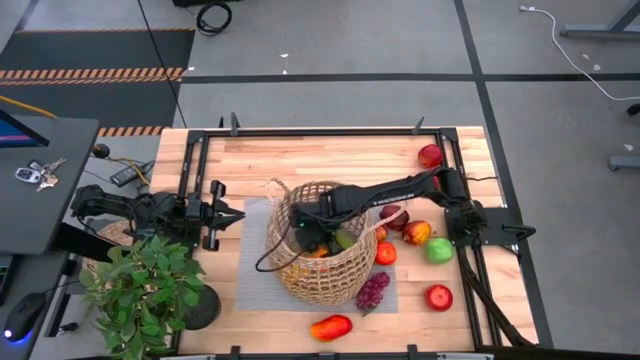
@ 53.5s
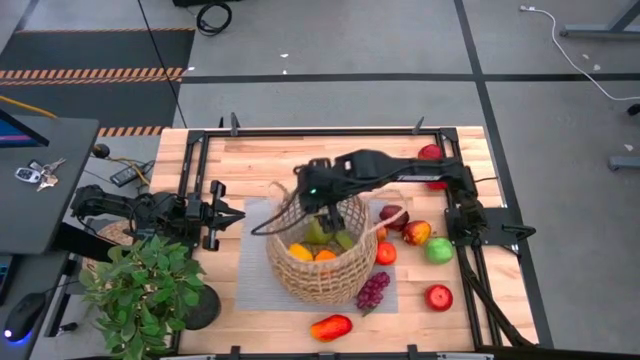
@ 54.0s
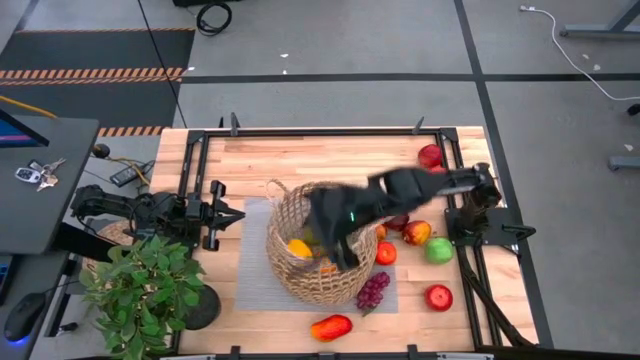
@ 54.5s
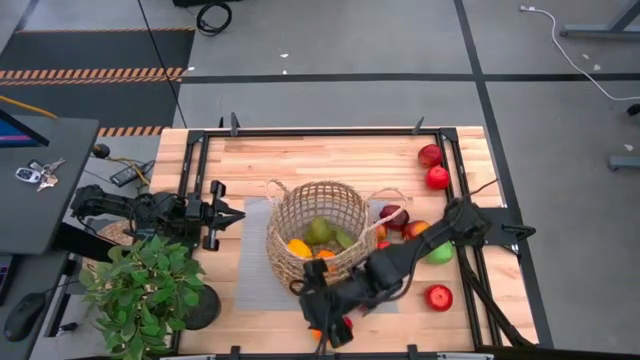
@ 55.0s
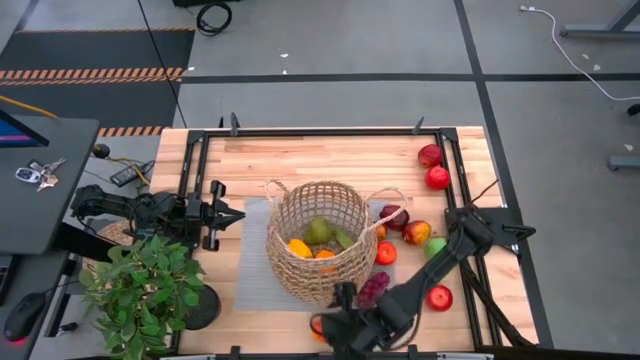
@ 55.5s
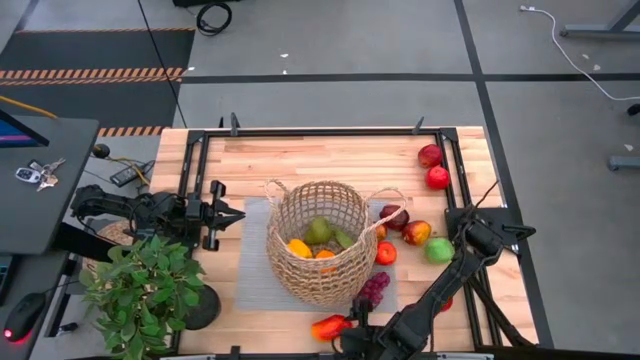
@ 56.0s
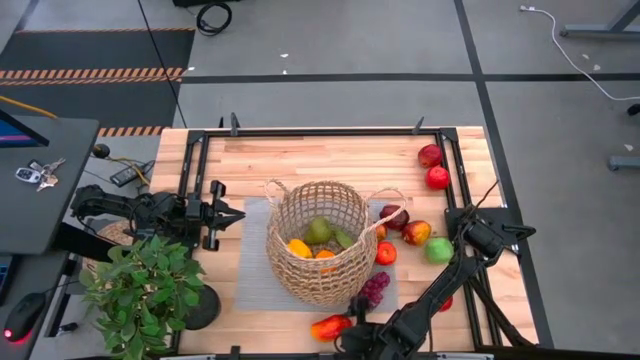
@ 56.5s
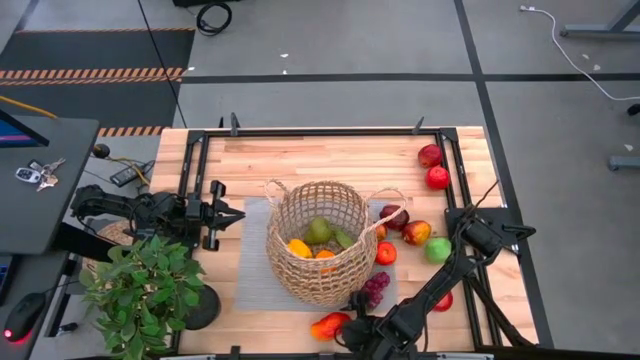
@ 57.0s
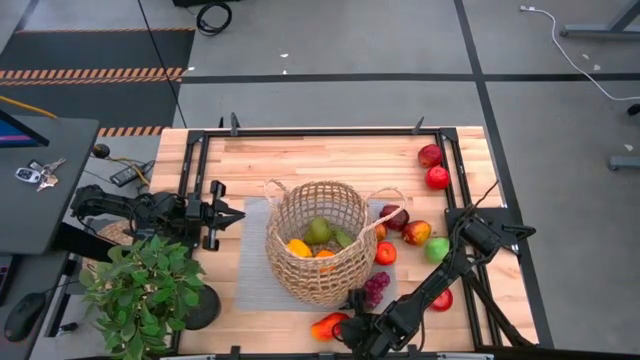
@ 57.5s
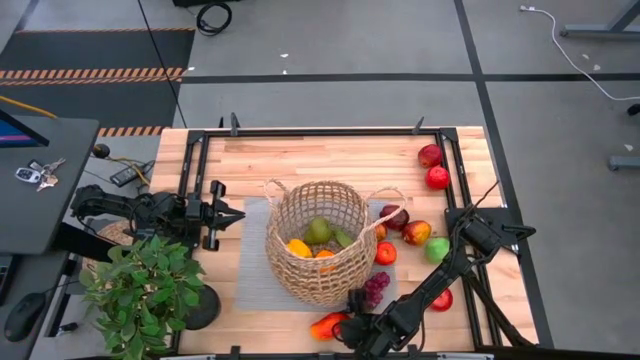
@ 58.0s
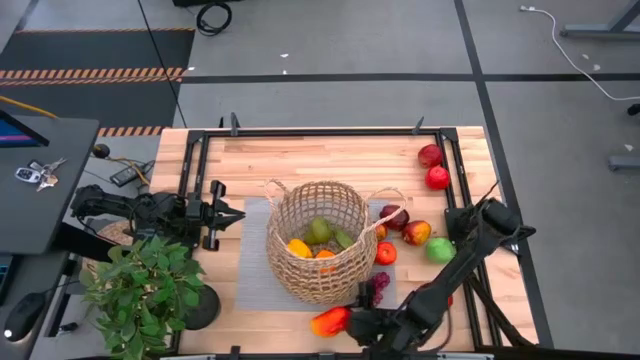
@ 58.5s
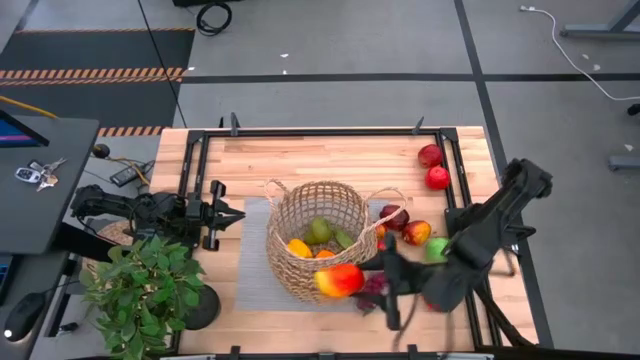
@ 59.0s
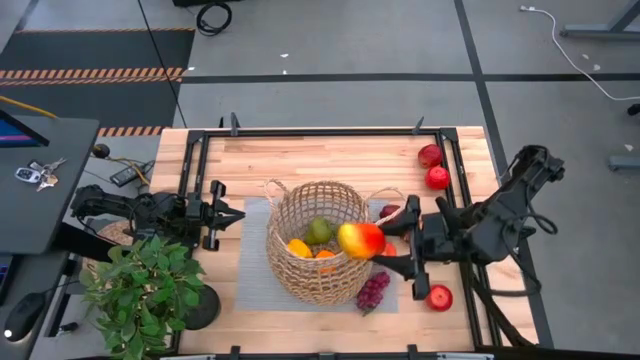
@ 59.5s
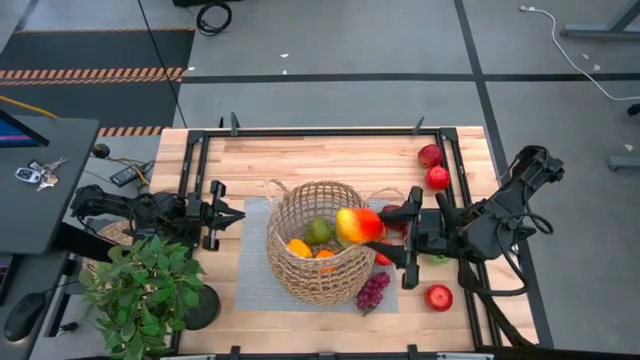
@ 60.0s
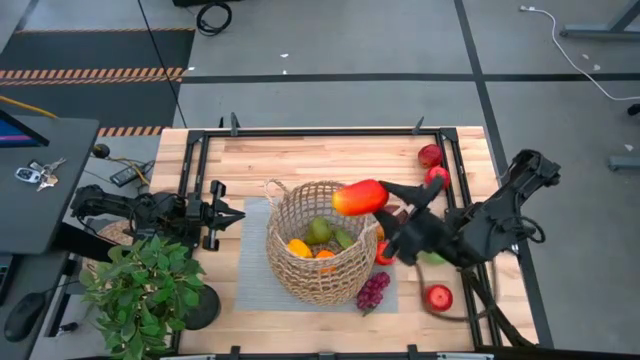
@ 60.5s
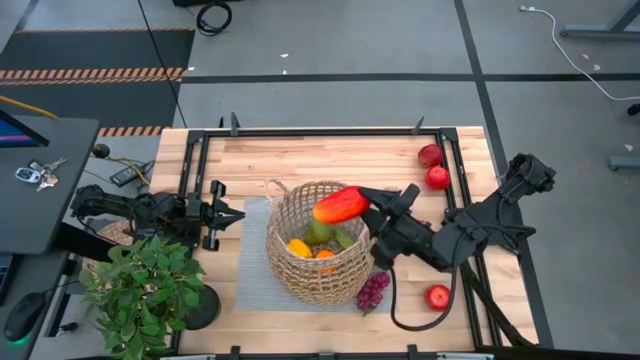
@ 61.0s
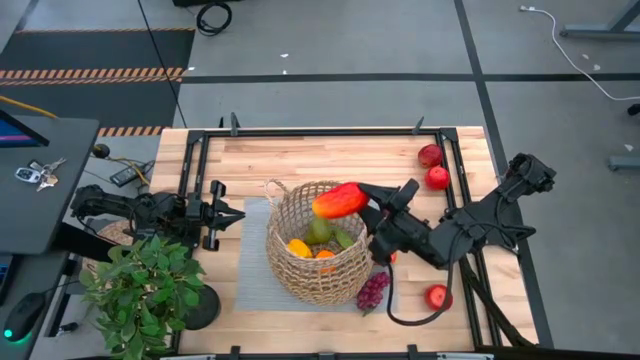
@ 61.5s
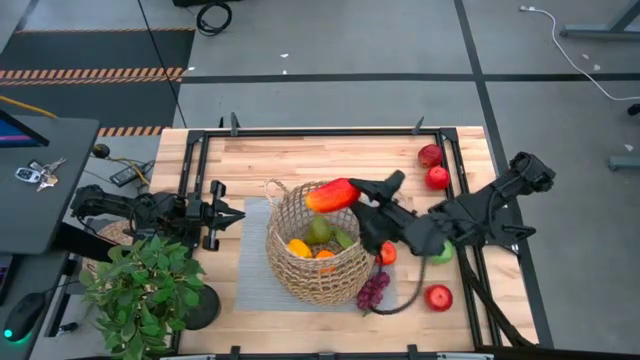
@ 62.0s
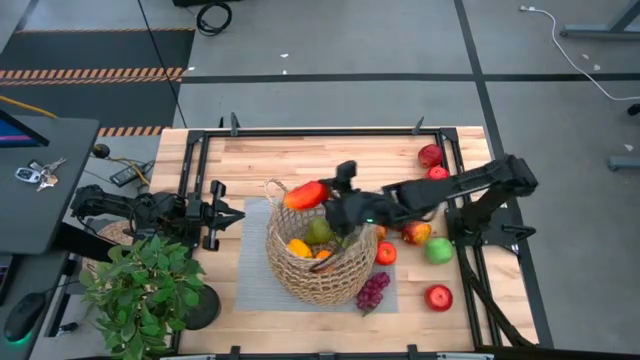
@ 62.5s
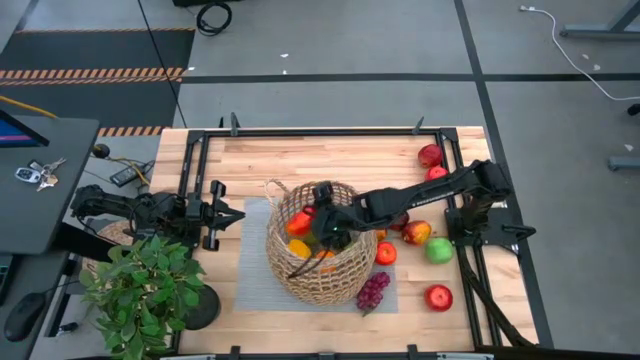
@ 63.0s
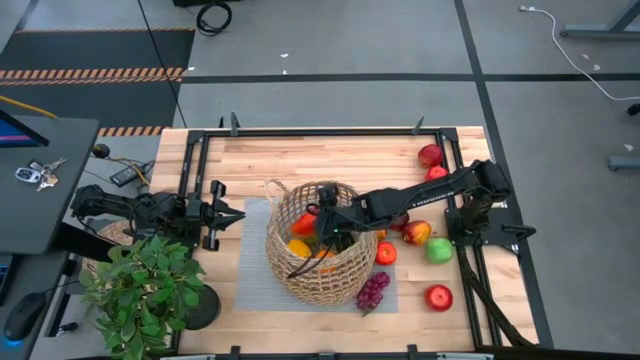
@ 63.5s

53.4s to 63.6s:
Task: Build produce basket
Put the orange mango into the brown basket

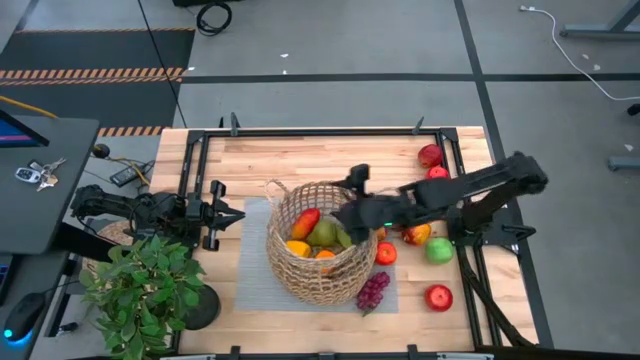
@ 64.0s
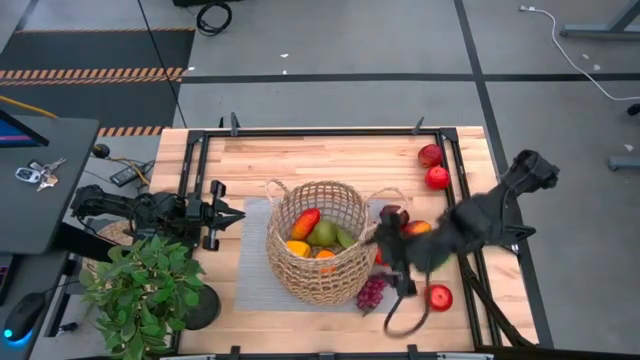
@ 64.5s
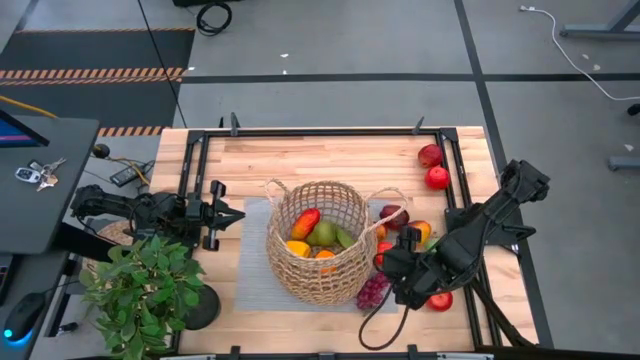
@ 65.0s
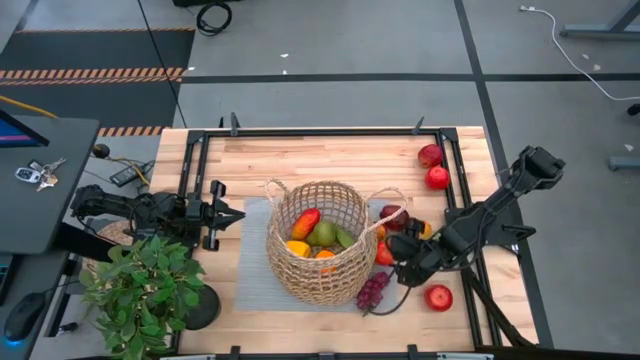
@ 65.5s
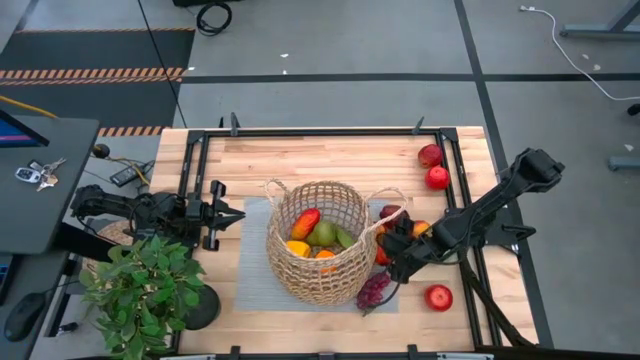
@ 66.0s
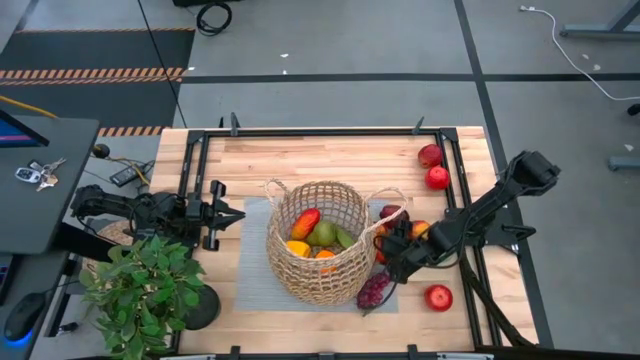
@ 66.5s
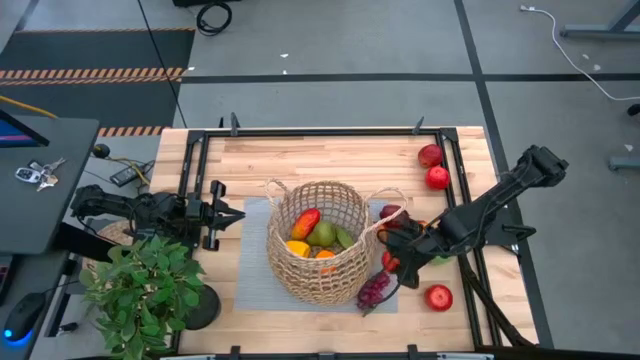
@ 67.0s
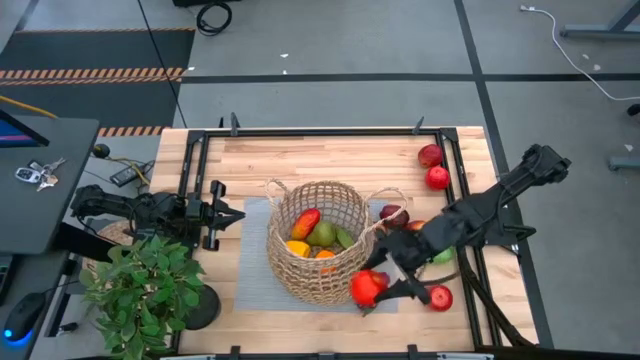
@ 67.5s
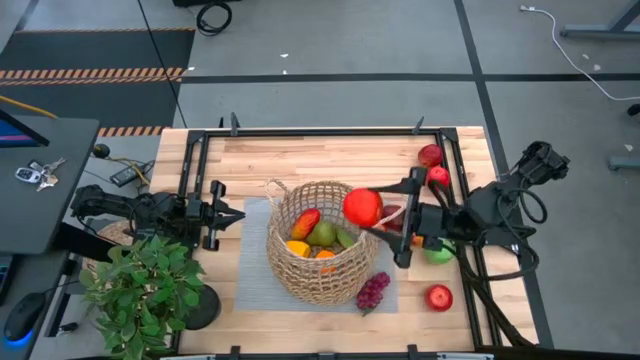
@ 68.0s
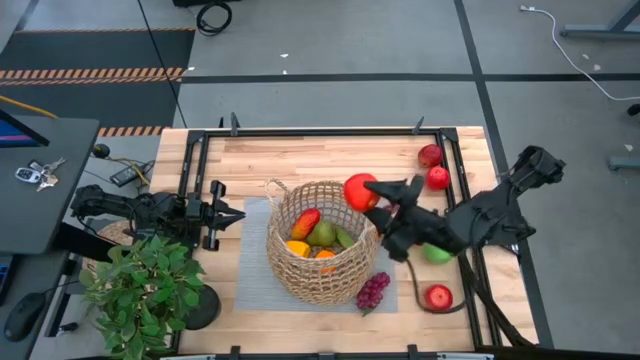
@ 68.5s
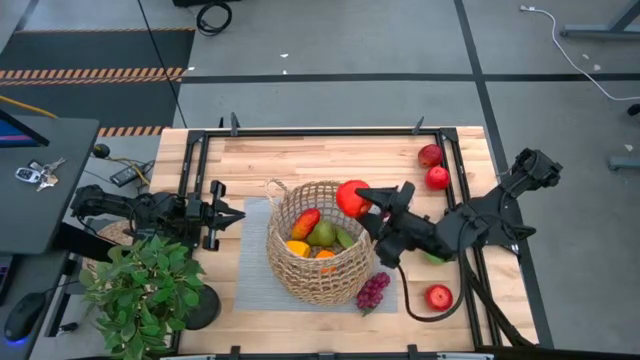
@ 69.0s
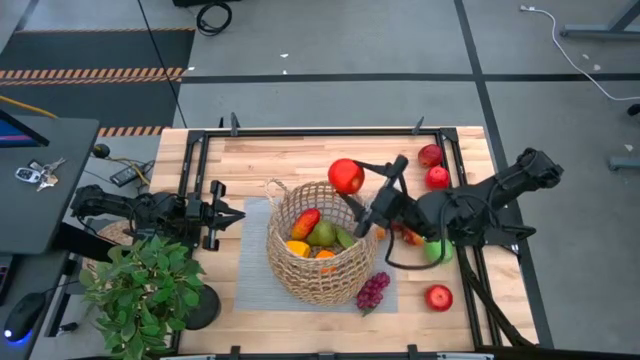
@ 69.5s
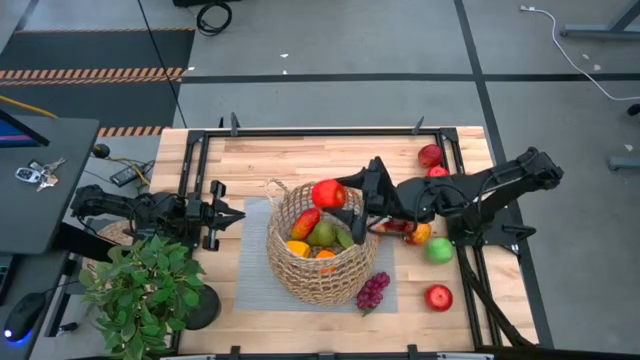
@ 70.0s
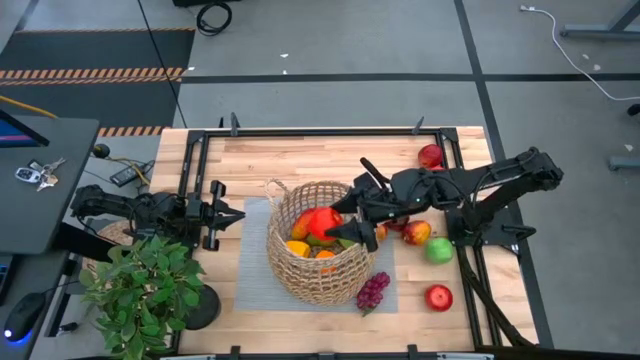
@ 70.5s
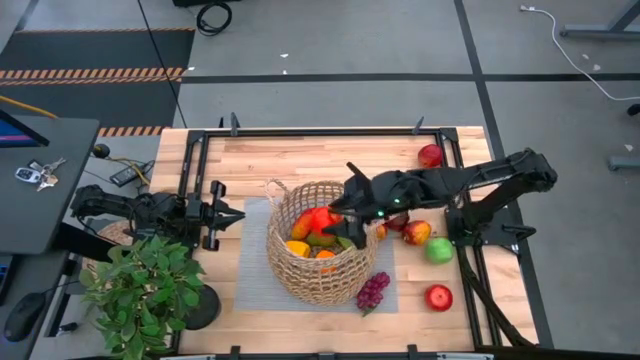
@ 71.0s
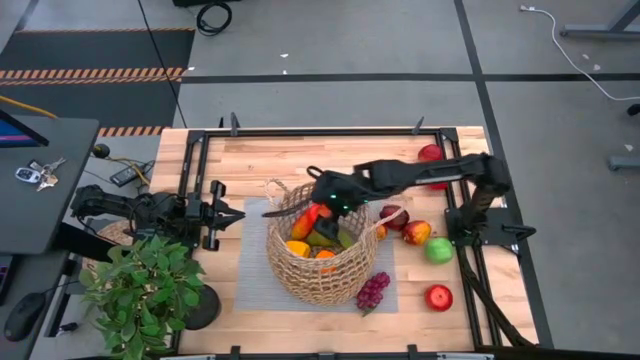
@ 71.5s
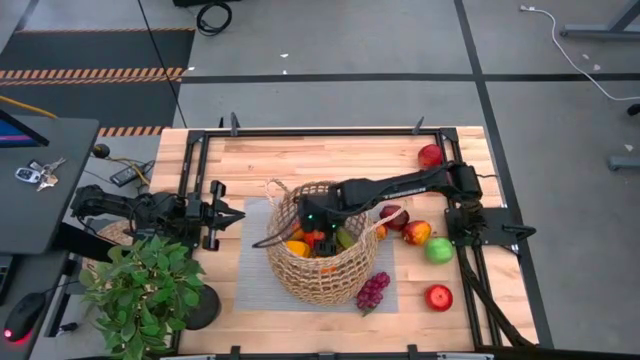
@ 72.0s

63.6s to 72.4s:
Put the middle red apple into the brown basket

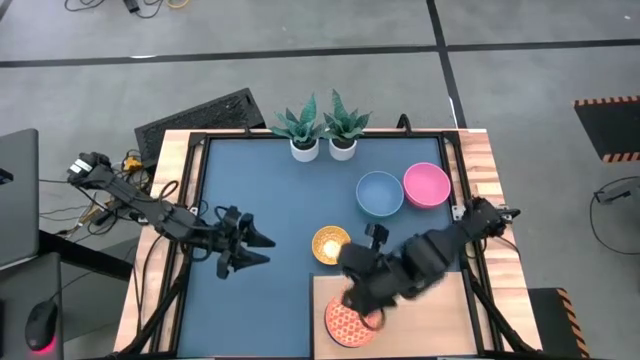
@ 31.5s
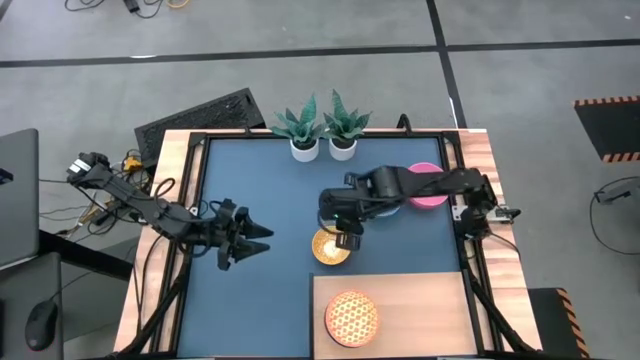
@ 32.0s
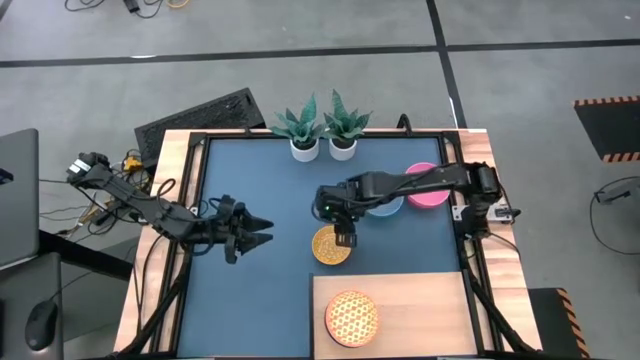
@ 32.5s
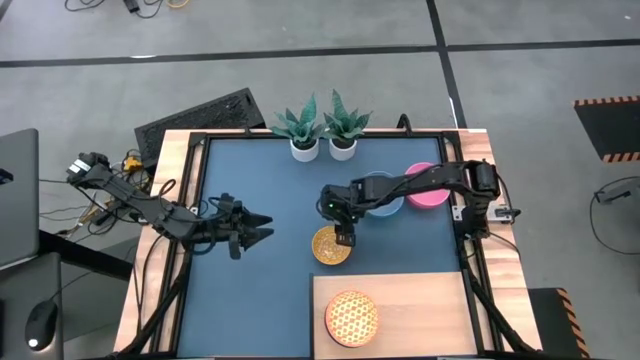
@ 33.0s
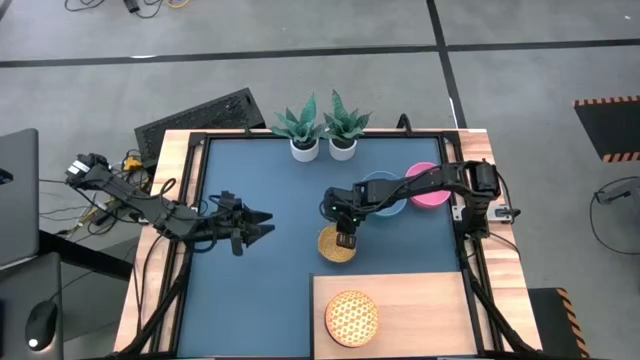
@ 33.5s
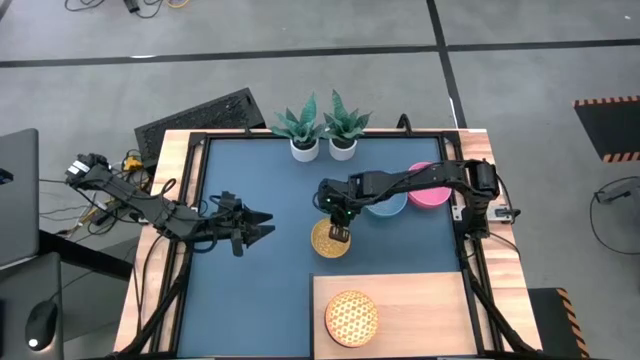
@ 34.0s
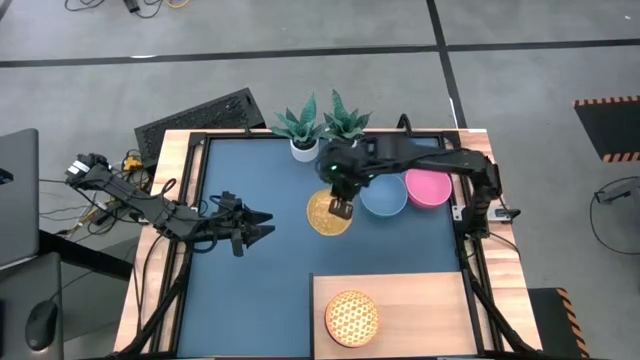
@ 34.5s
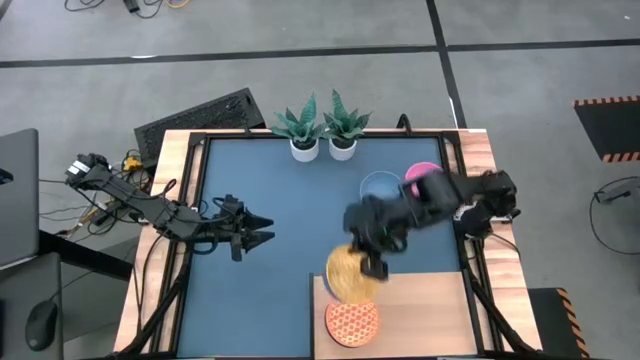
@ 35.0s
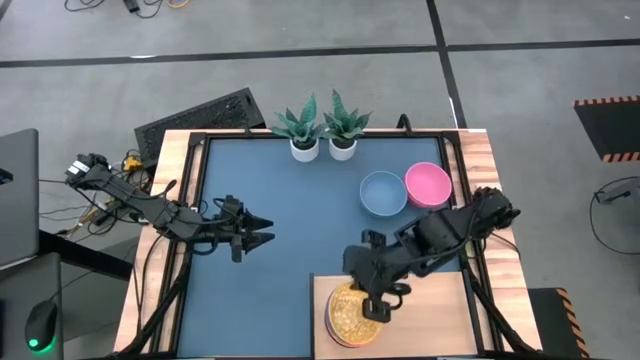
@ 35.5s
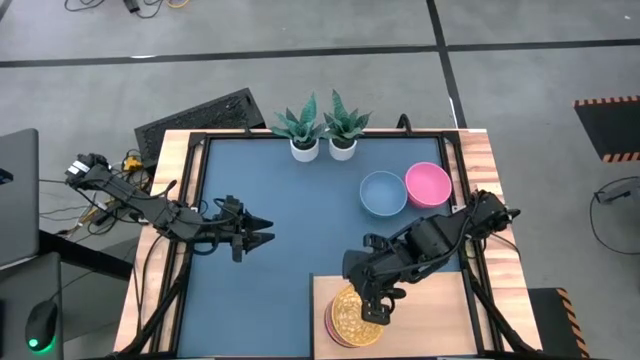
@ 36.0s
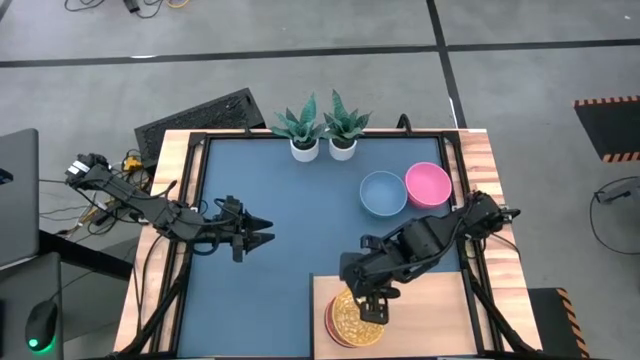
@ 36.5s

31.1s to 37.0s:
Task: Place and stack bowls onto a shelf
Stack the yellow patterned bowl on top of the orange patterned bowl on the shelf
